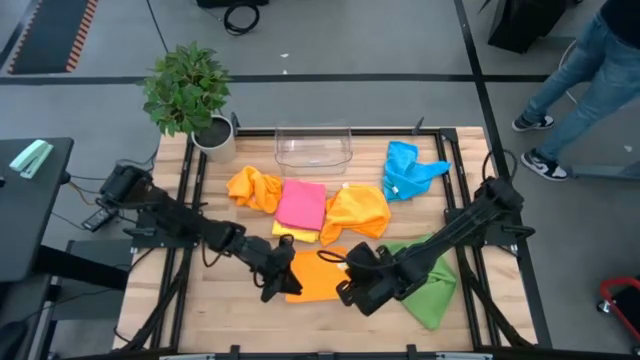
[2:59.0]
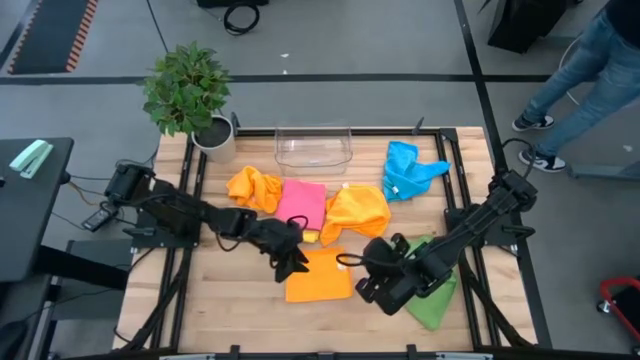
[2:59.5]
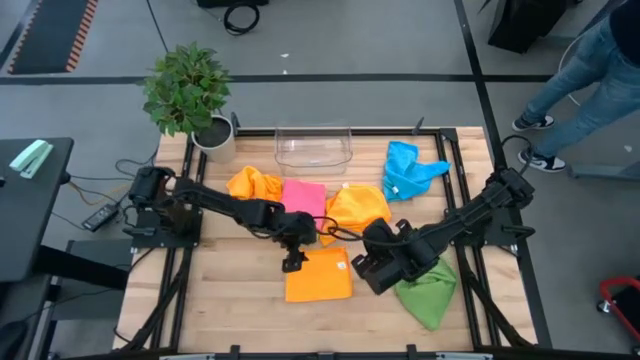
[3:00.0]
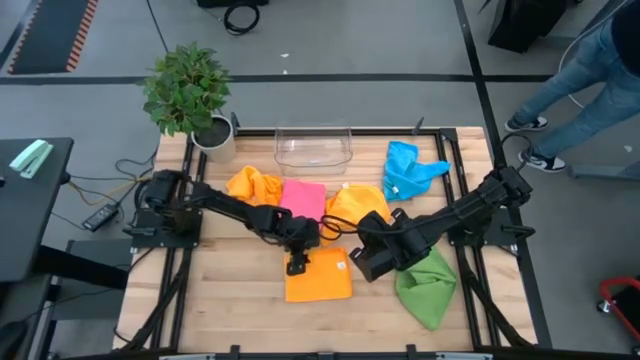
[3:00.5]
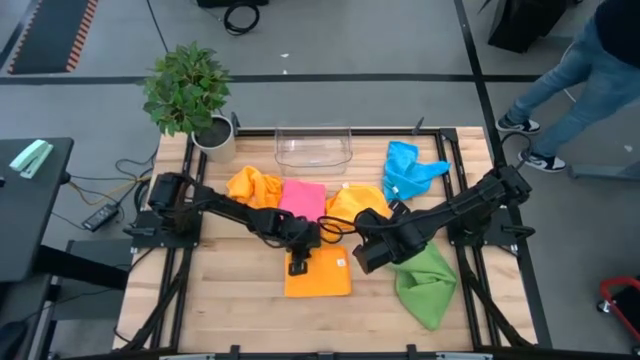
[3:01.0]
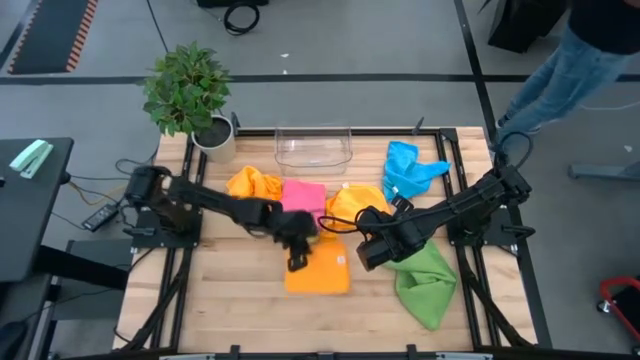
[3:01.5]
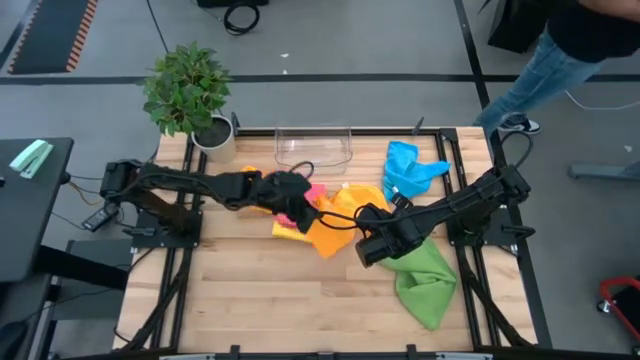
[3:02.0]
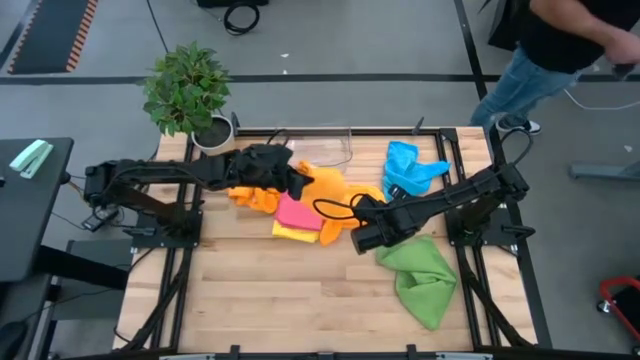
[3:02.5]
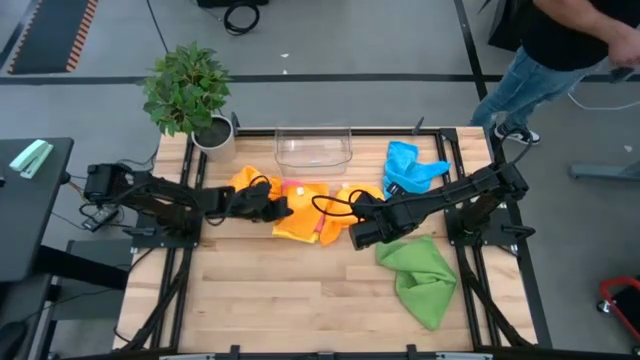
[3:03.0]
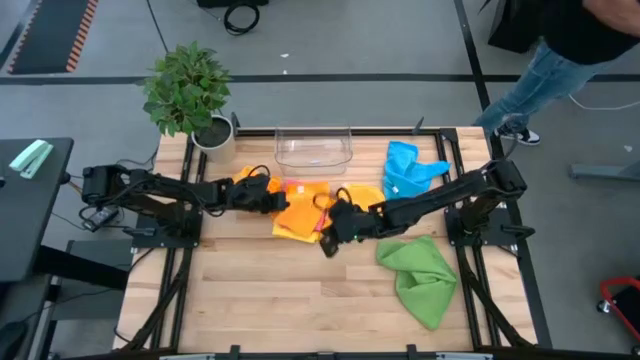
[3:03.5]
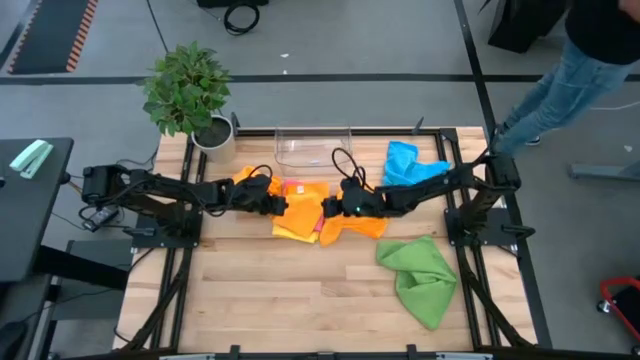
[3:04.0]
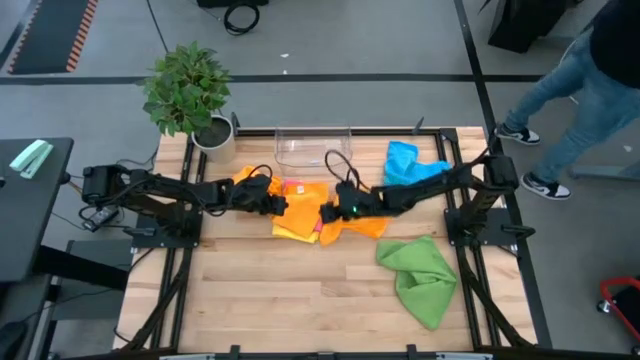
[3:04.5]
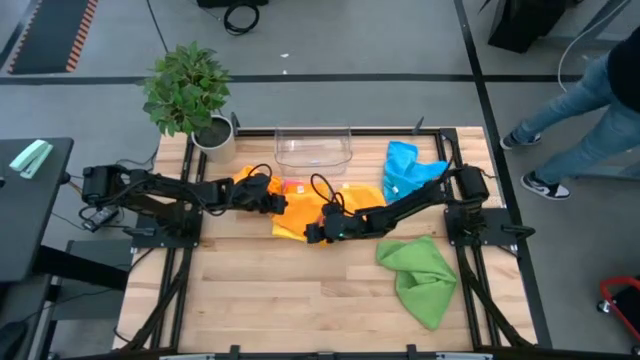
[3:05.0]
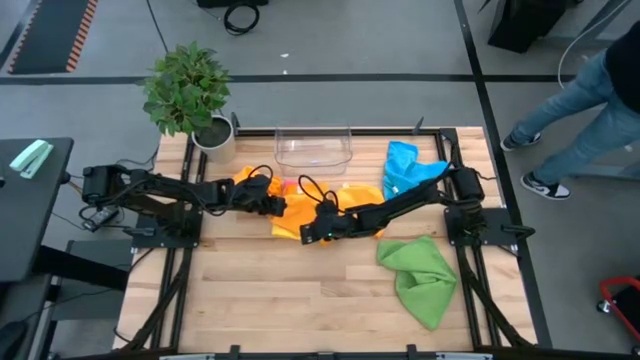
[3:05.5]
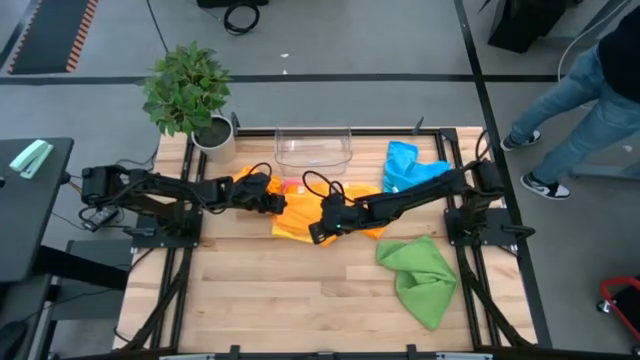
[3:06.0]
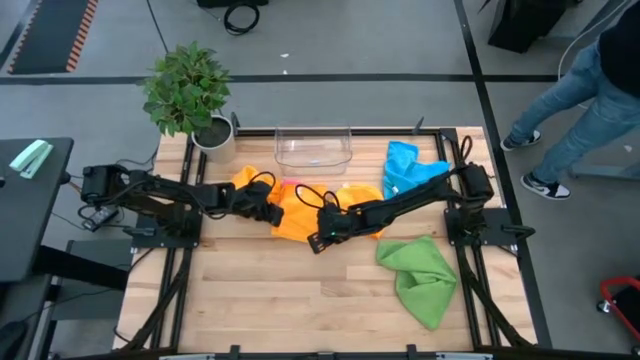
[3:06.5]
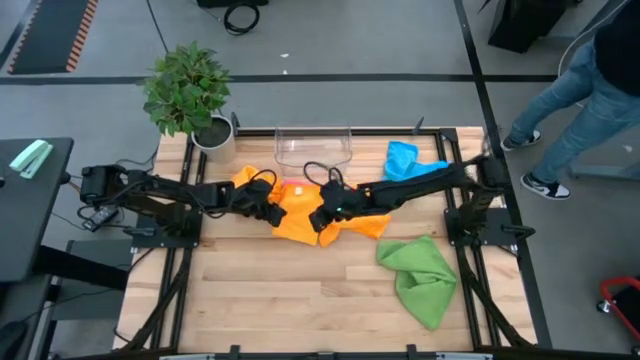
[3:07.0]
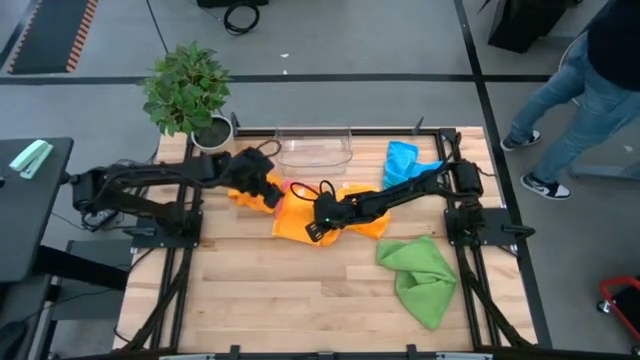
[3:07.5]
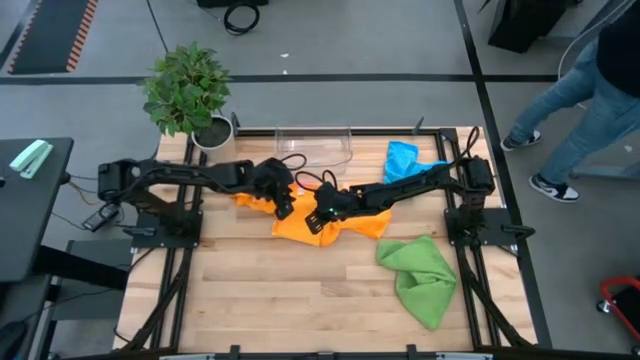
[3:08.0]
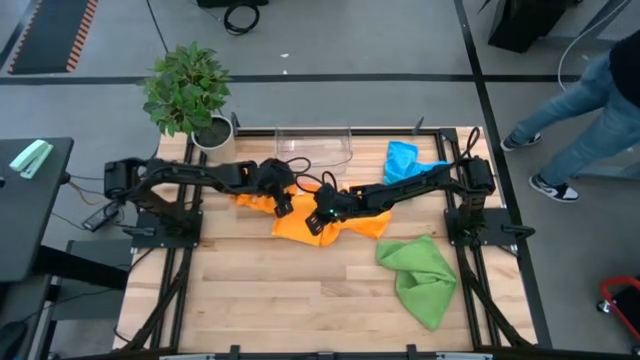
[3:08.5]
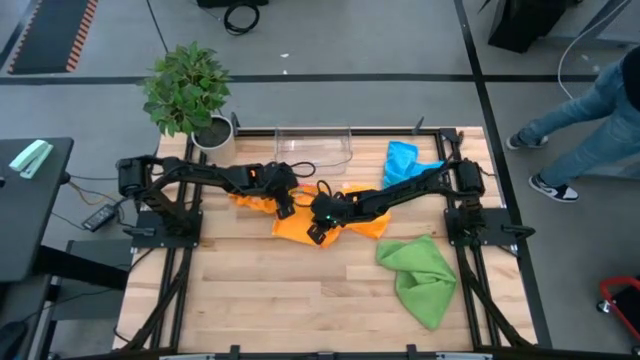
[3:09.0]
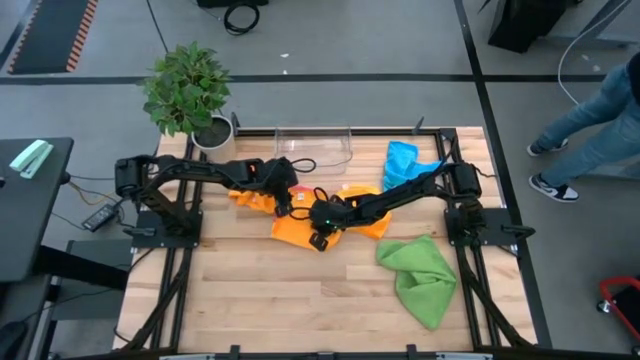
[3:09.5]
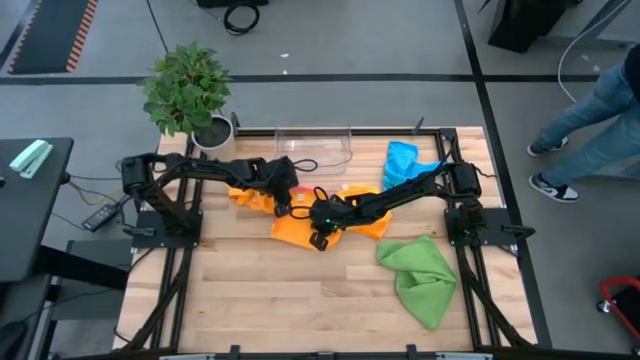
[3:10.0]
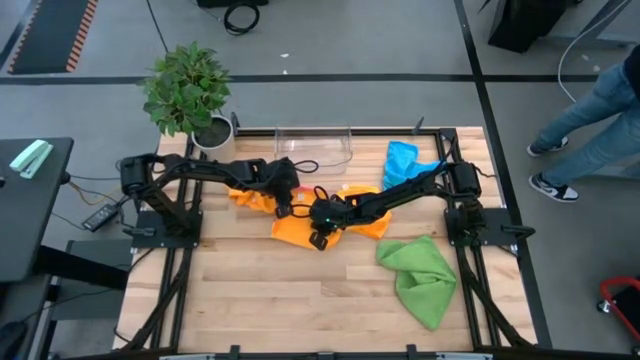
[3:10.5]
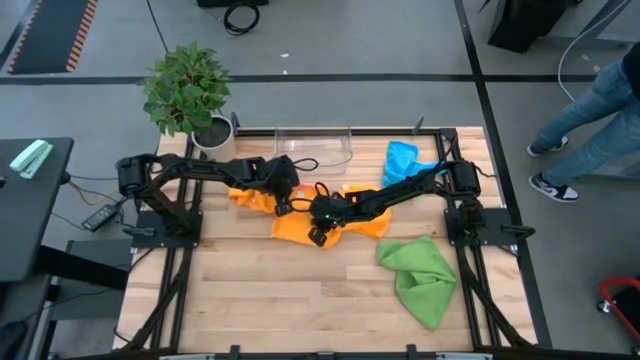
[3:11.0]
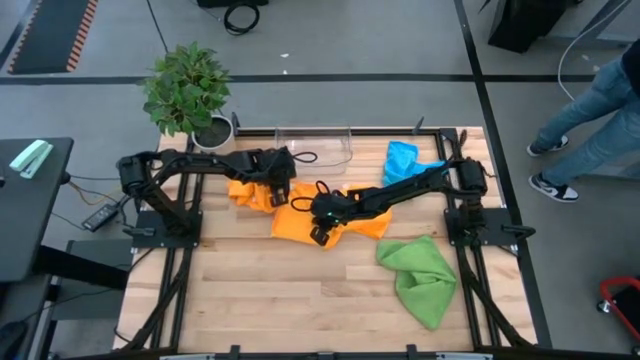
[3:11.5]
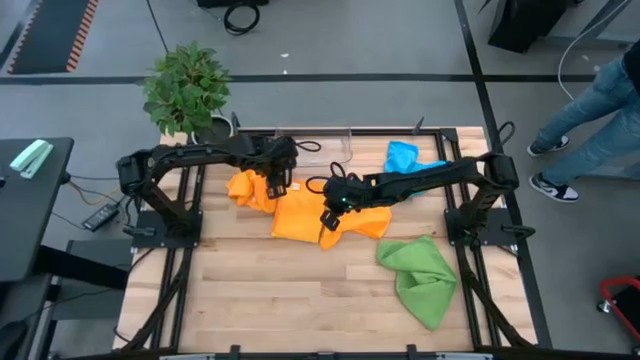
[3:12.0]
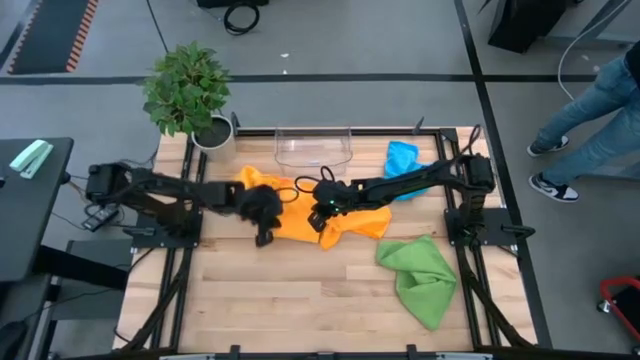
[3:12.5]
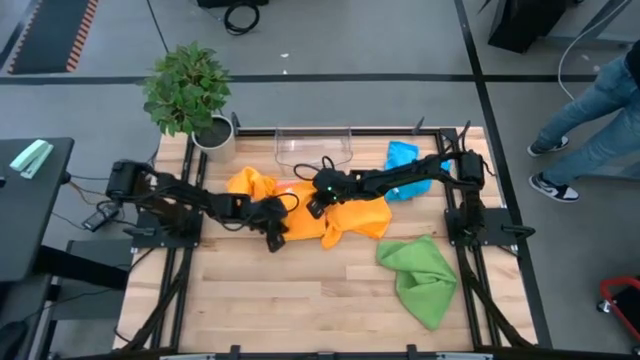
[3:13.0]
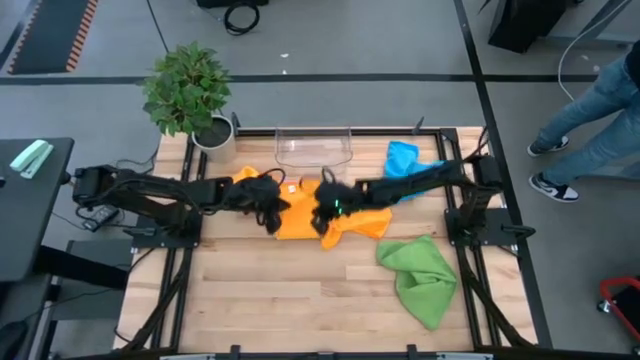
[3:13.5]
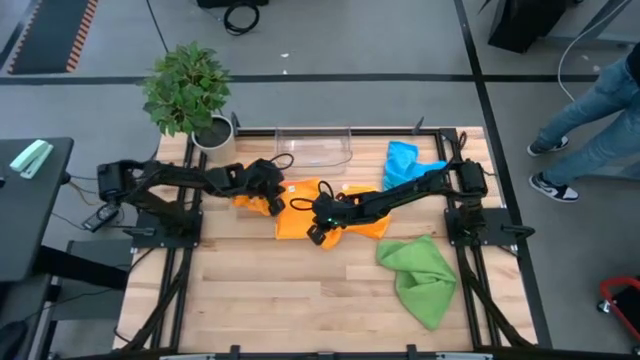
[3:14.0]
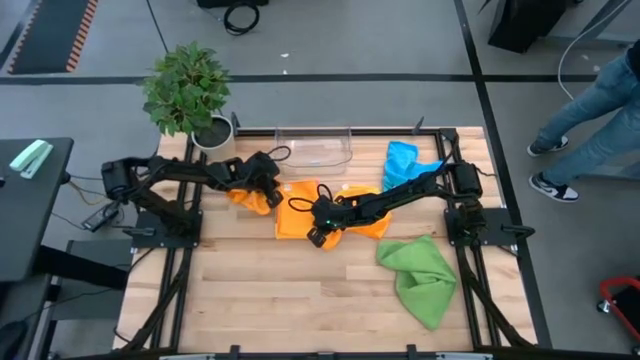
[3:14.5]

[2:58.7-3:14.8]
Task: Fold microfiber towels
Stack the bottom folded orange microfiber cloth on top of the pink microfiber cloth

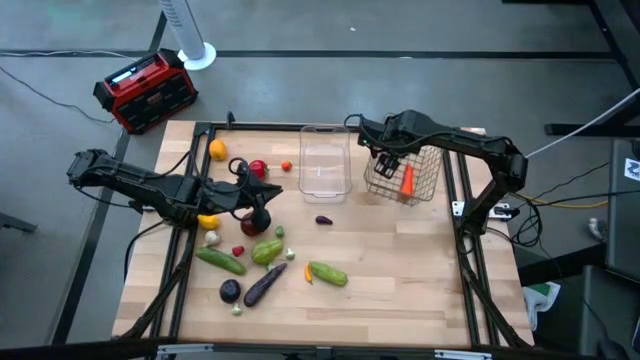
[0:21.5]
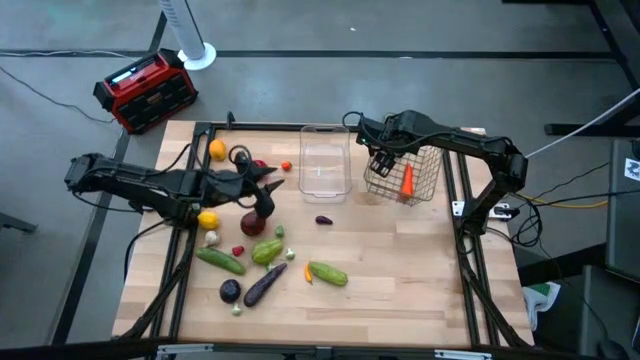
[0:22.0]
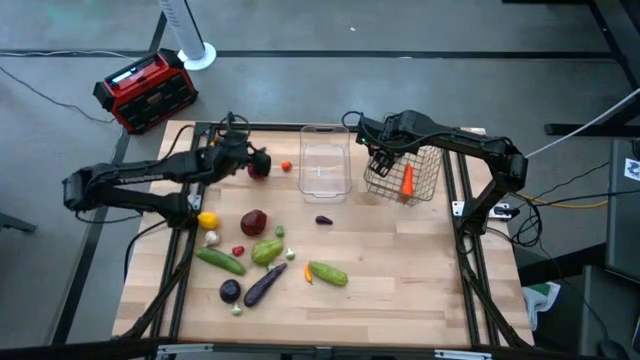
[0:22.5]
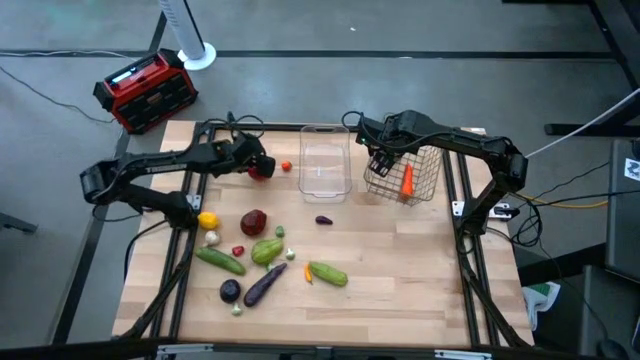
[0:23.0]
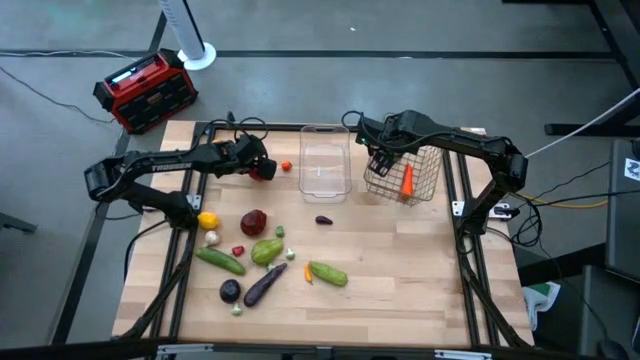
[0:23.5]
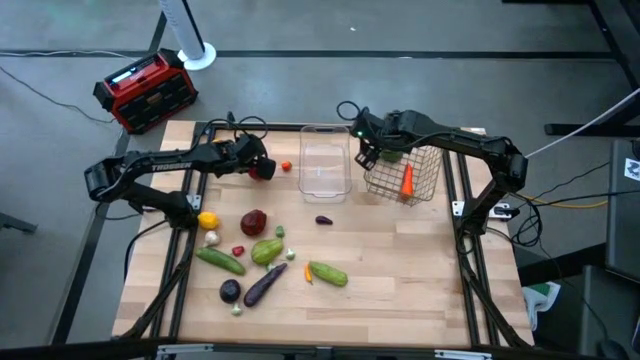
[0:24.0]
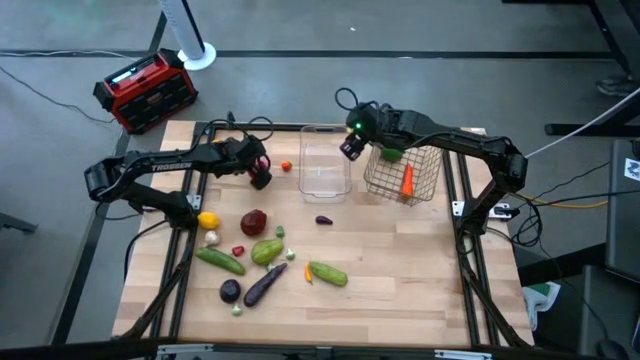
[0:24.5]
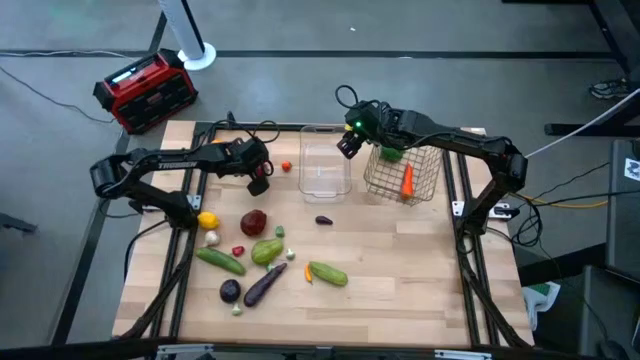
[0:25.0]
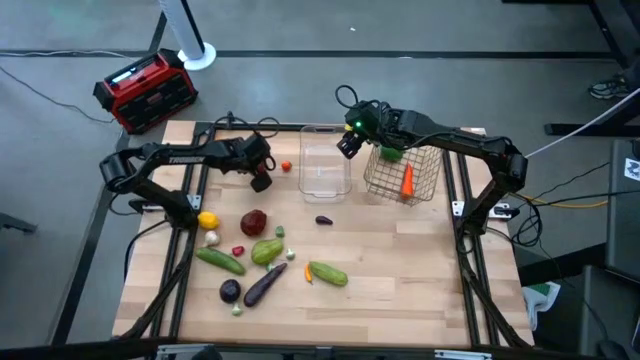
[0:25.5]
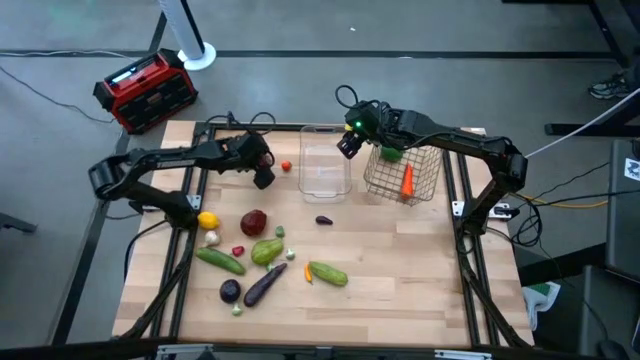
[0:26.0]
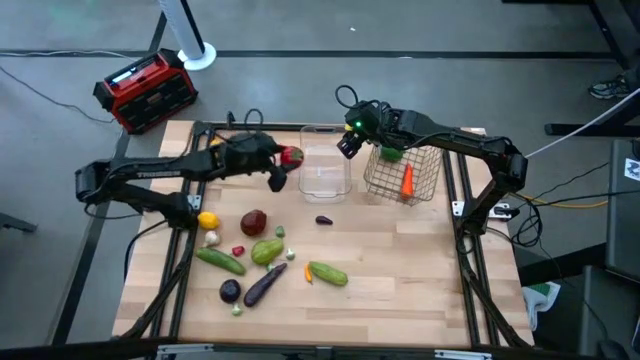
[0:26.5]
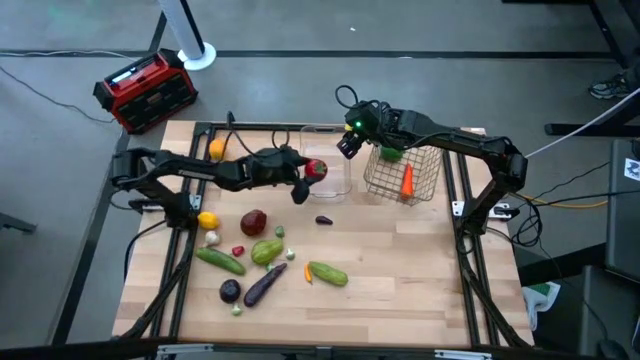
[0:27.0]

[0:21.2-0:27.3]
Task: Sort produce into baskets
Put the red tomato into the transparent bin
